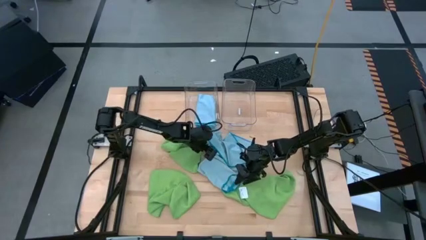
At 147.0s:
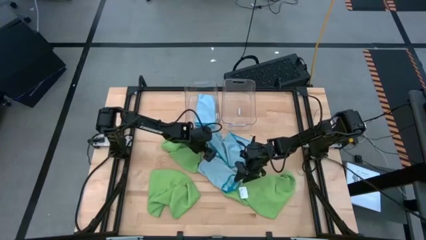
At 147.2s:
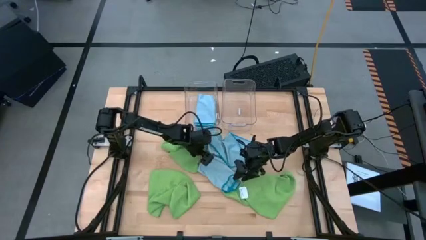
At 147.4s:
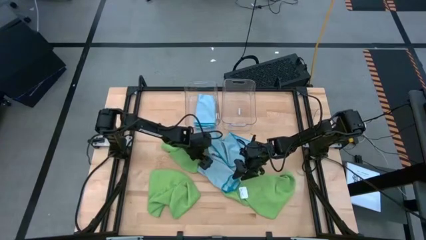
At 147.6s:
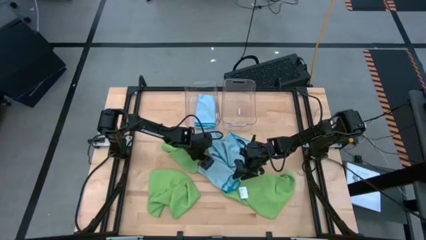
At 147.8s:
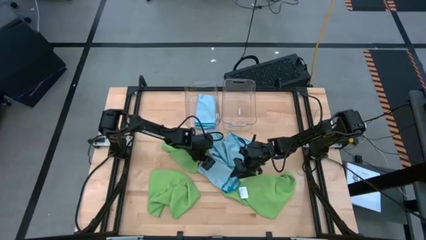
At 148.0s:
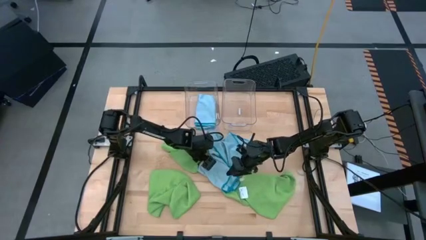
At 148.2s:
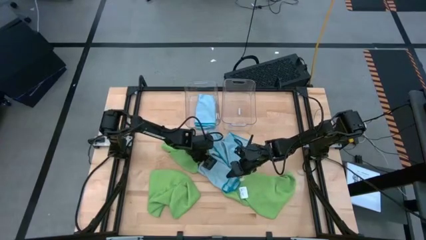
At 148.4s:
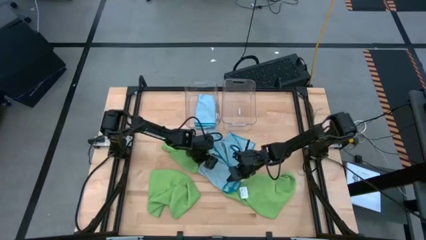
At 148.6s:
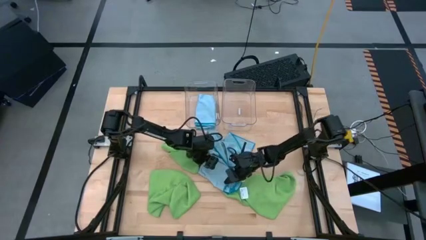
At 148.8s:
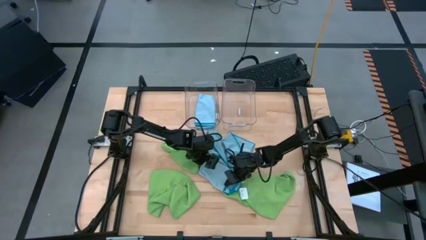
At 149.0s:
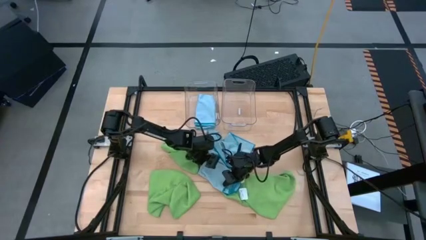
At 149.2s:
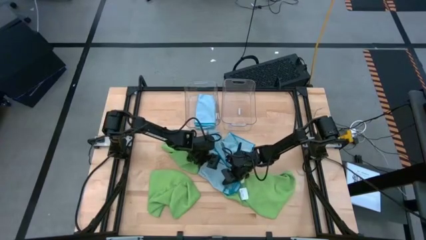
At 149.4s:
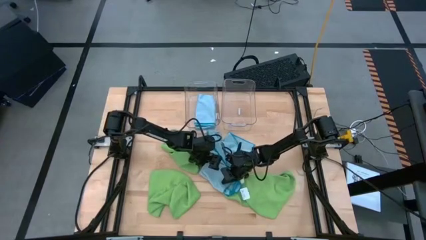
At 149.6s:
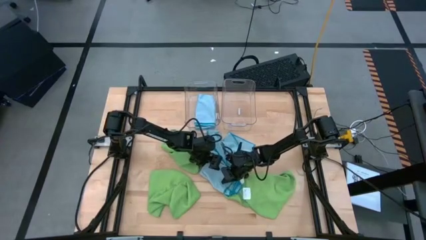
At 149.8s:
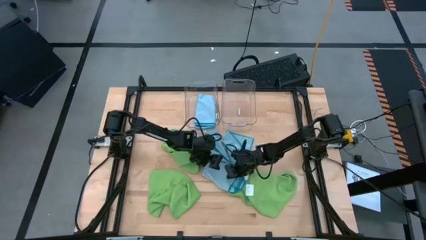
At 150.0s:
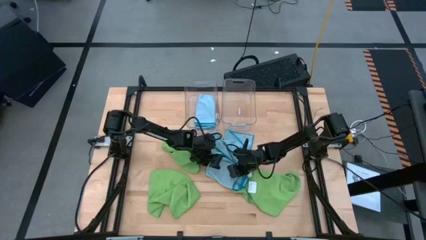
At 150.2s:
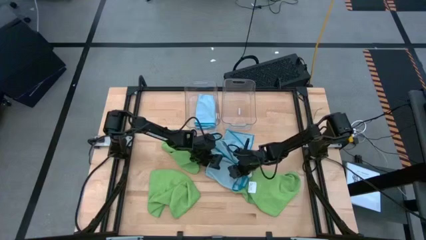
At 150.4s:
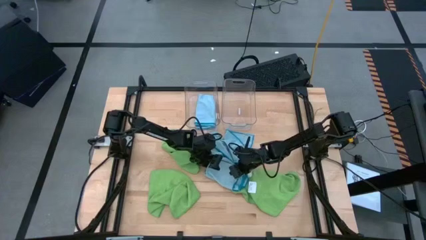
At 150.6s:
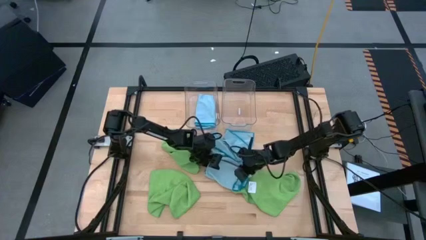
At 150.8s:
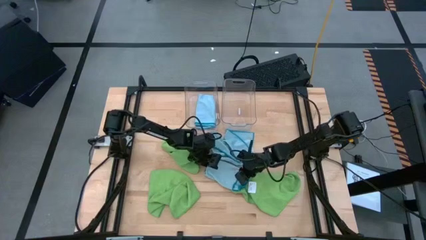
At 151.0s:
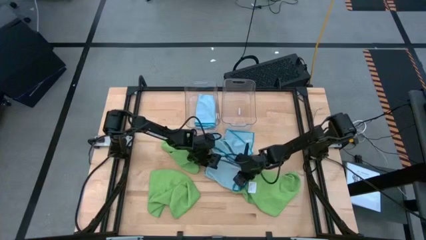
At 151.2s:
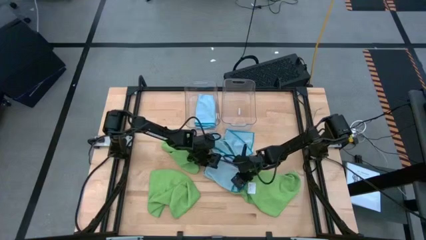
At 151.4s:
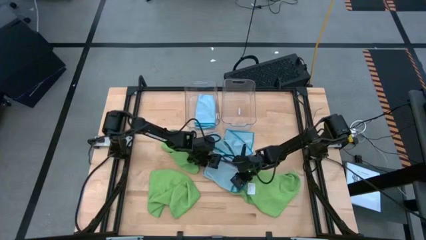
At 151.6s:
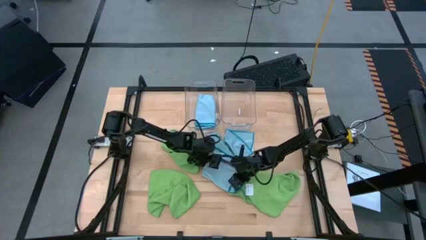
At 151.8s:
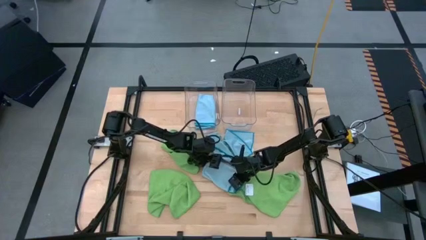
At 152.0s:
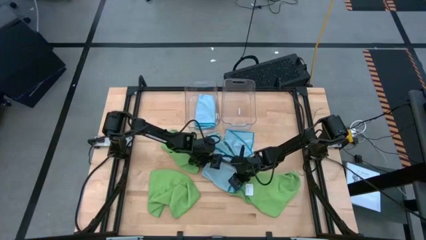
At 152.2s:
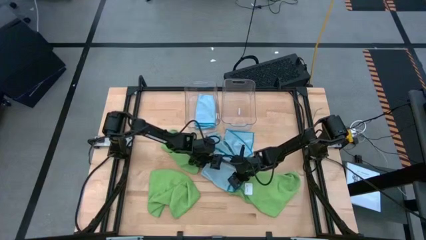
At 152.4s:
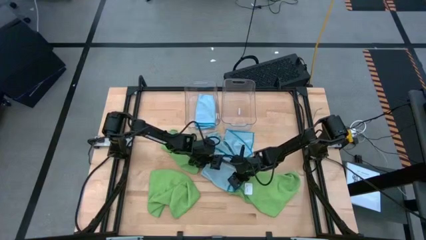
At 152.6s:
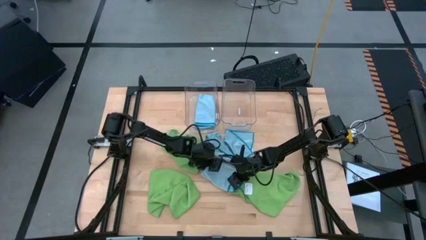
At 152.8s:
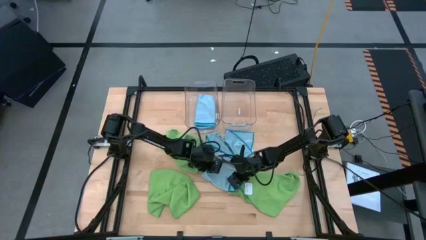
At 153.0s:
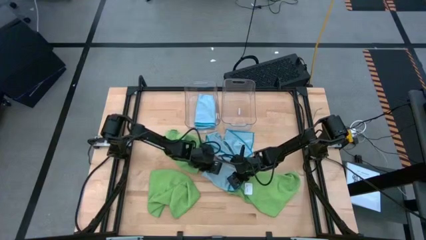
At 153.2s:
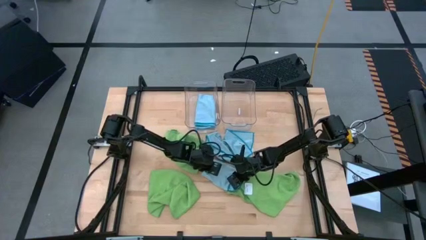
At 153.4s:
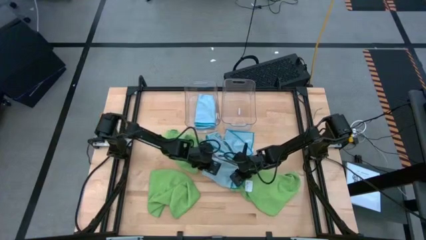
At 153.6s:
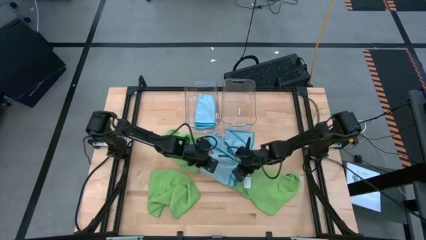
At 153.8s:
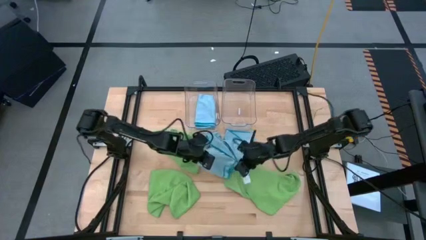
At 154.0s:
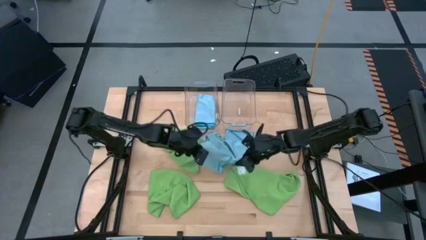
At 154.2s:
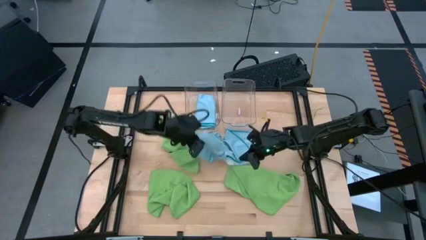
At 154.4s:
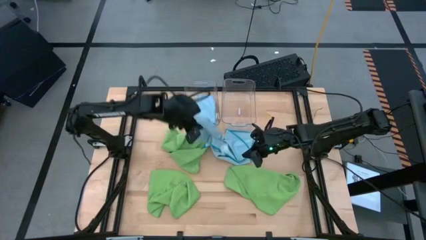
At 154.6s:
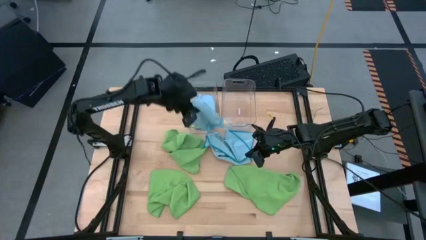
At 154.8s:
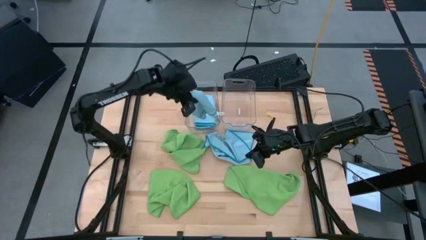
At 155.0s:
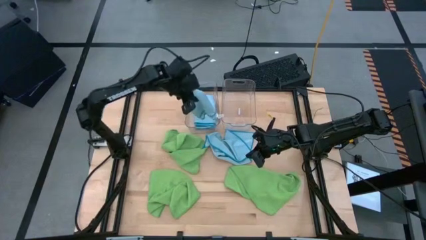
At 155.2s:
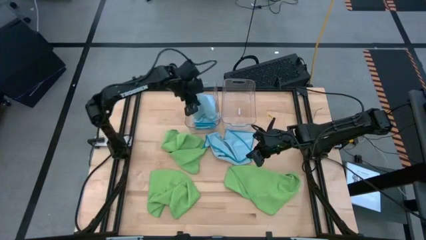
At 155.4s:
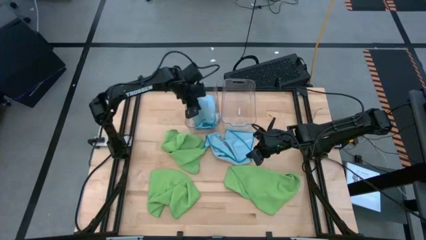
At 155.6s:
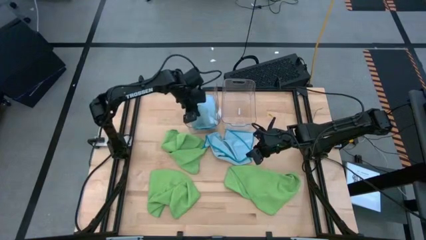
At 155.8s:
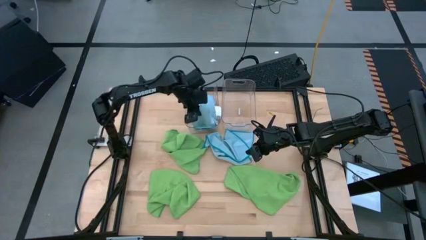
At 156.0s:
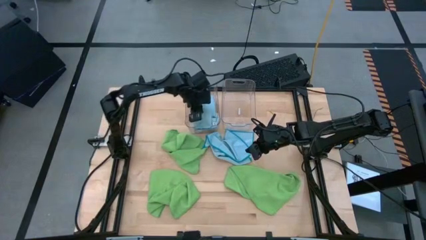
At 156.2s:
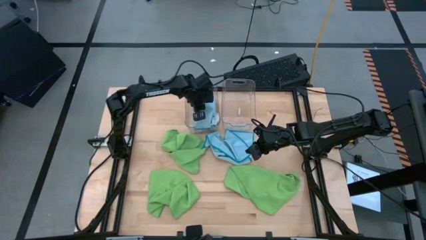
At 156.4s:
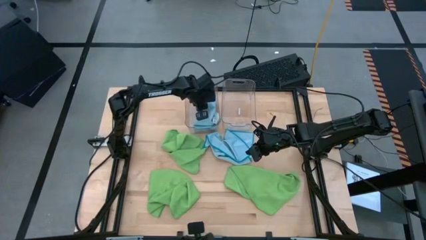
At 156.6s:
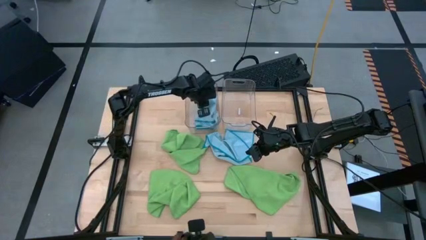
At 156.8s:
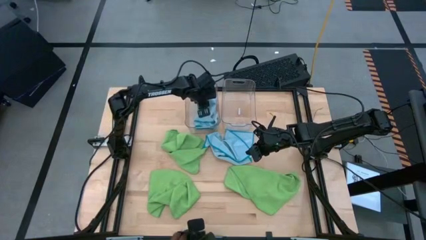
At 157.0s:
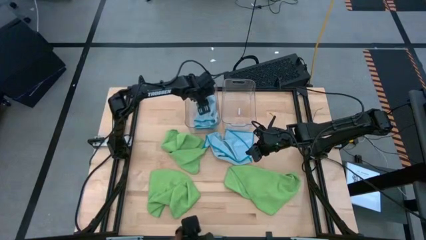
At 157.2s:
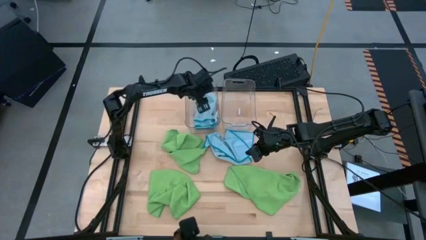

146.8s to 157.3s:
Task: Fold microfiber towels
Stack the folded blue microfiber towel on top of the other blue microfiber towel in the left transparent bin
